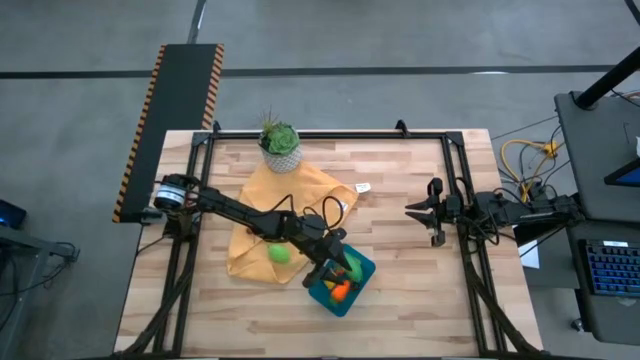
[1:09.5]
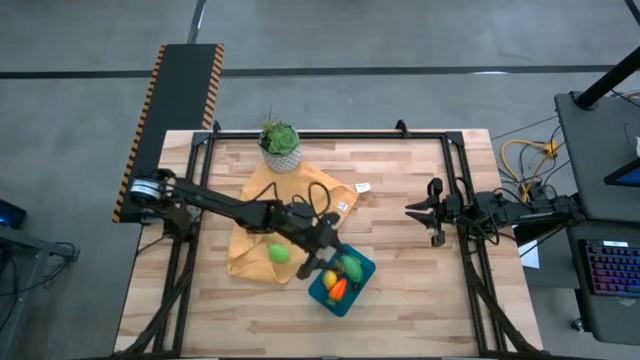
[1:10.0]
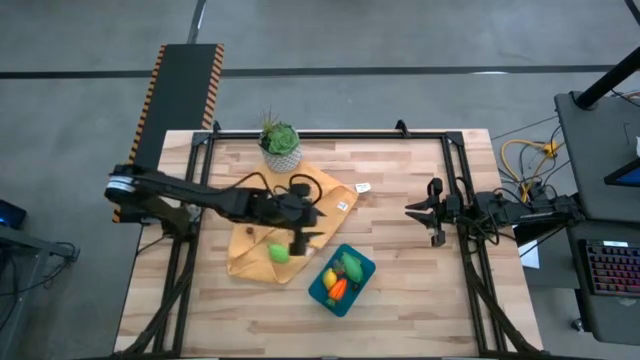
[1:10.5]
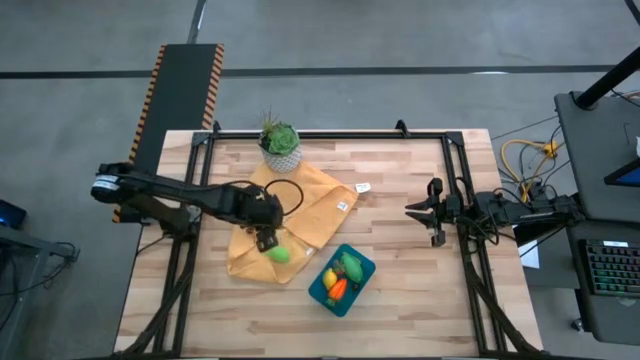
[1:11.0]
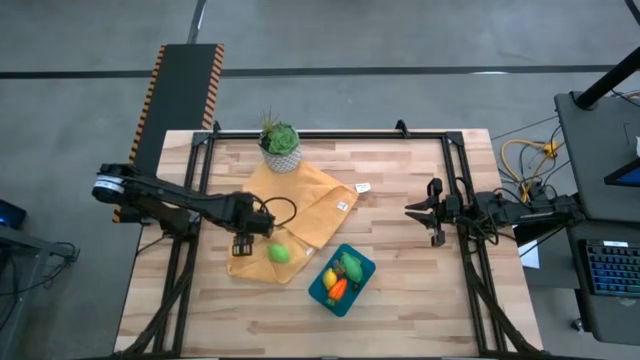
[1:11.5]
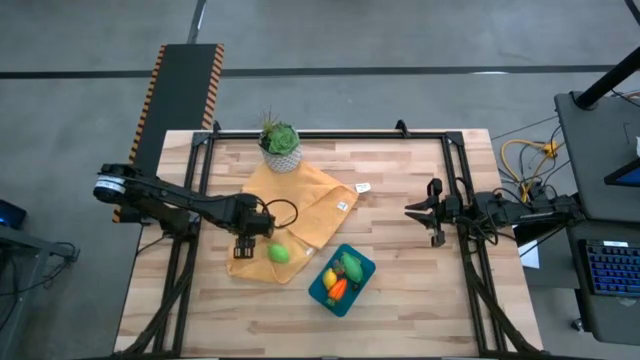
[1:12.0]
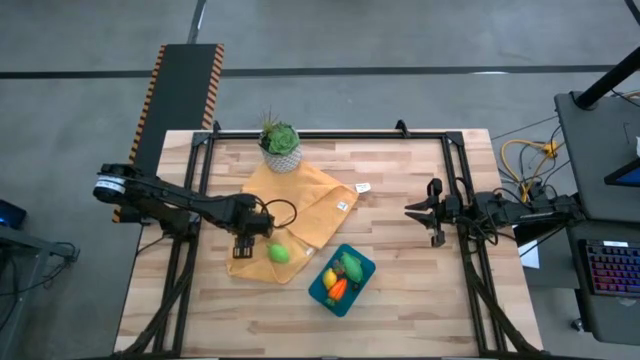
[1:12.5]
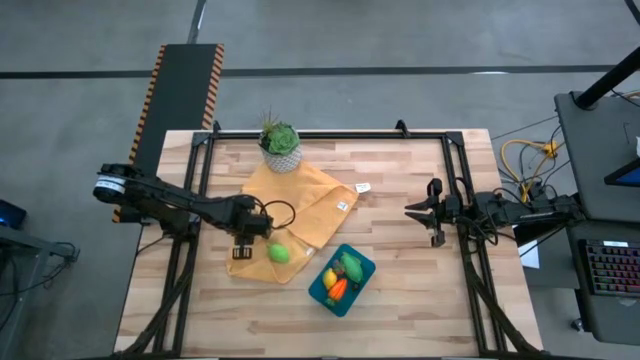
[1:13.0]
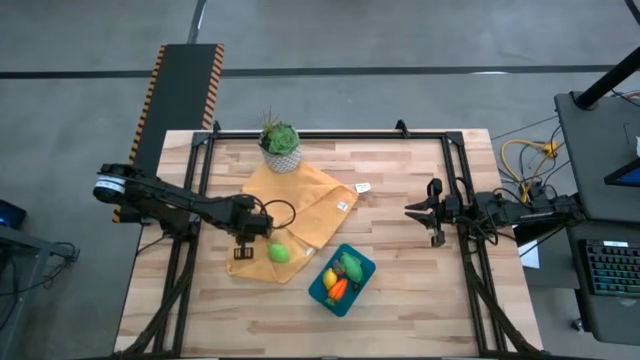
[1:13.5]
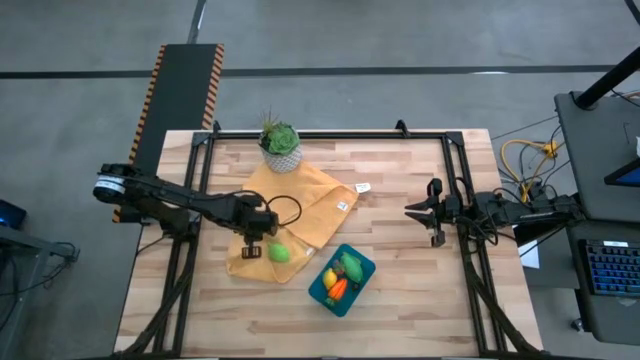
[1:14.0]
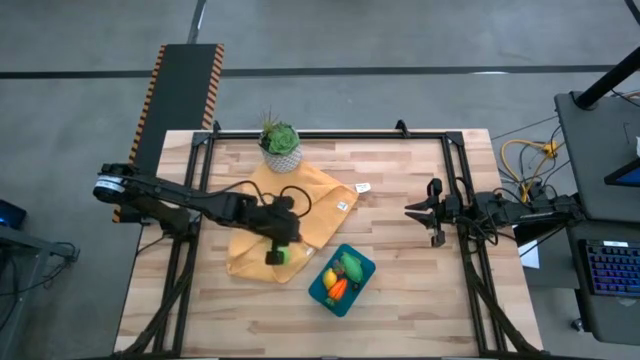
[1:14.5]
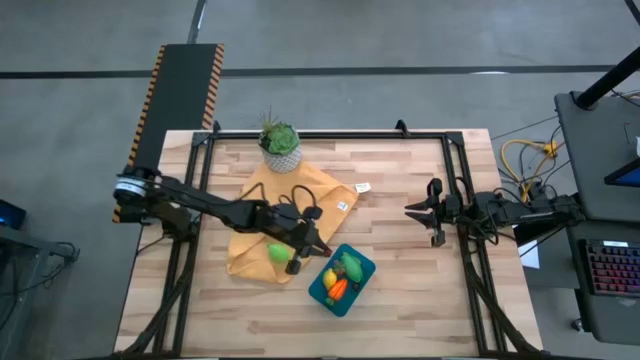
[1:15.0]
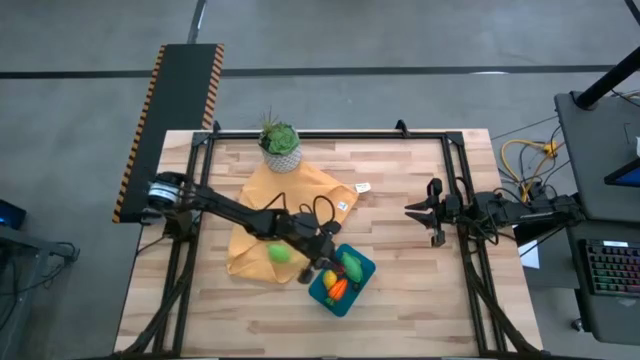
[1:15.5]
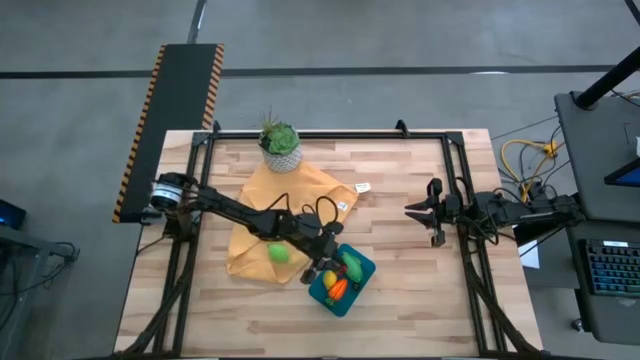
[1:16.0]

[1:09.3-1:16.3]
Task: Pick and placing Produce into tupperware
Put the red cherry into the blue bin

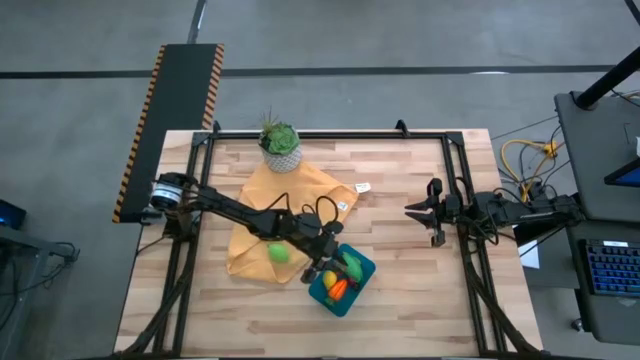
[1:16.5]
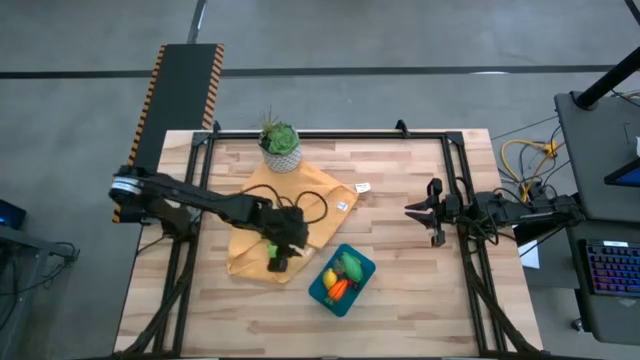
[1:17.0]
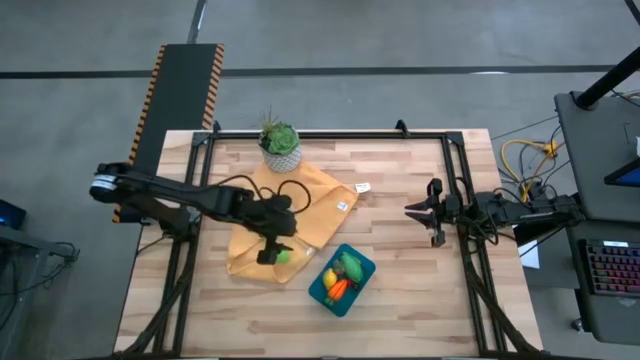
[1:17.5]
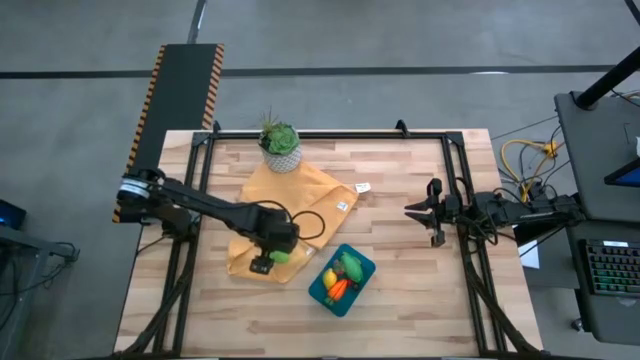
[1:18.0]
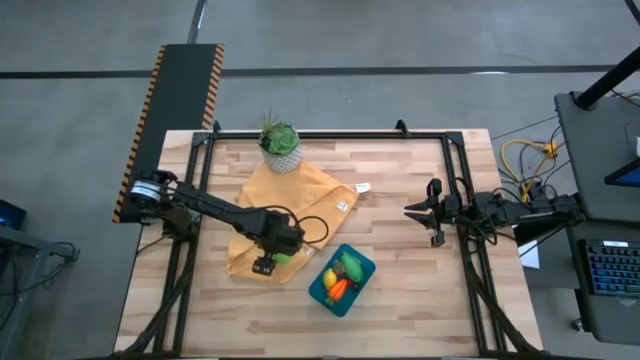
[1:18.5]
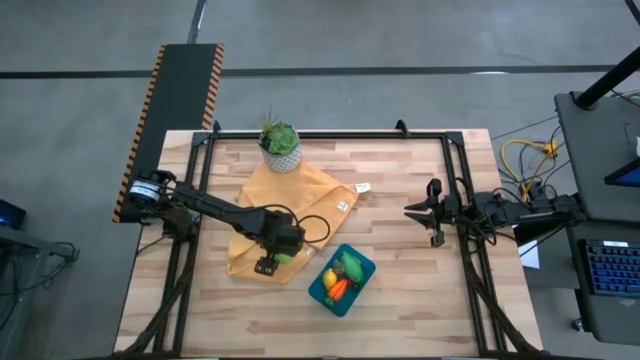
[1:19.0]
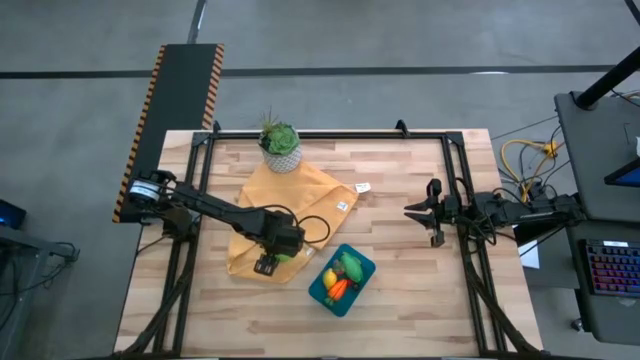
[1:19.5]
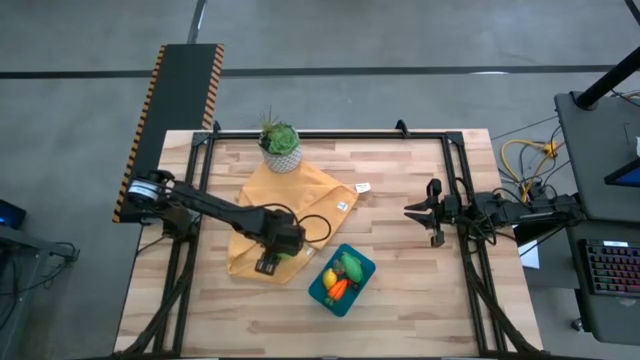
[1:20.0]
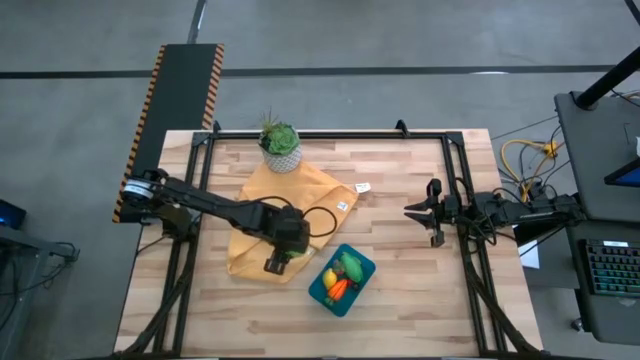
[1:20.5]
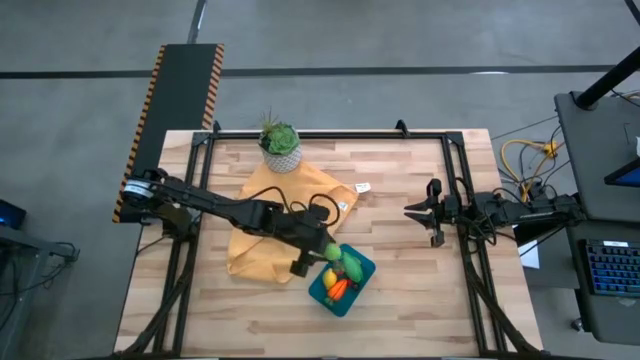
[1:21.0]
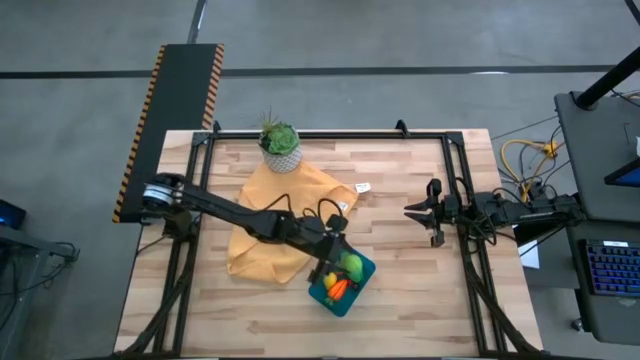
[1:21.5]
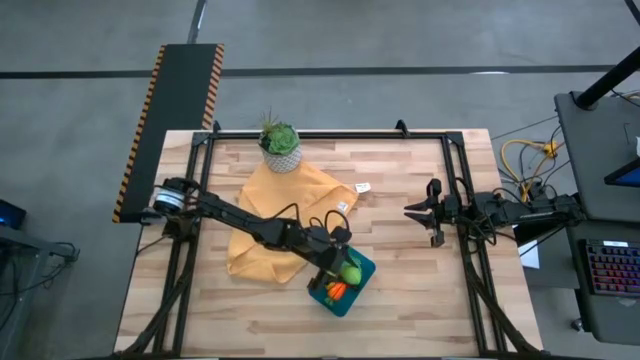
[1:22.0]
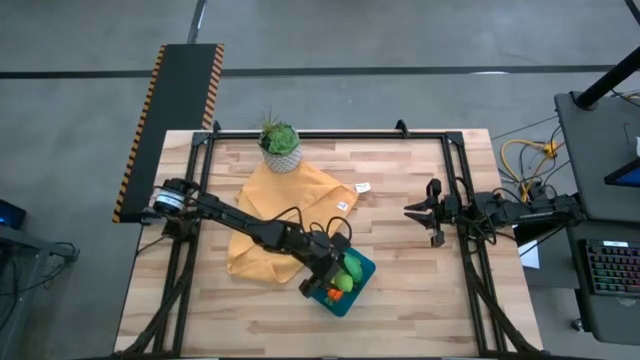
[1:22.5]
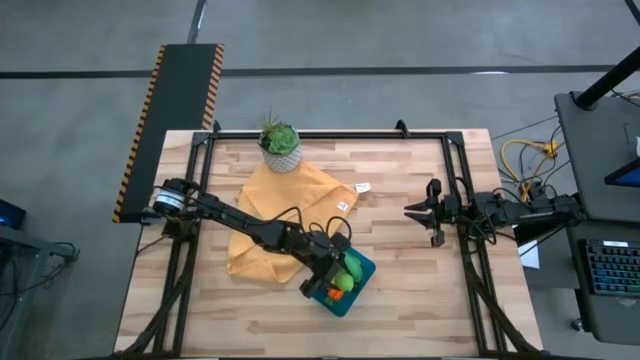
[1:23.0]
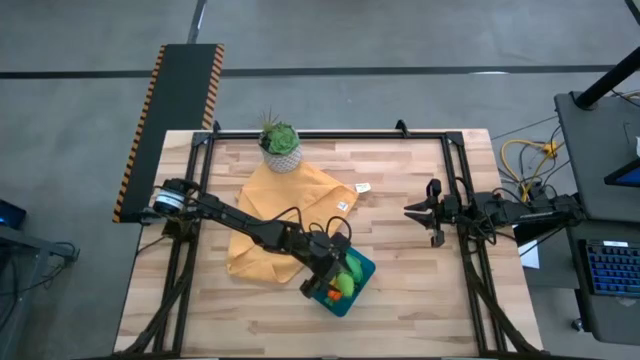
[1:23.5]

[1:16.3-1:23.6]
Put the green melon into the blue bin

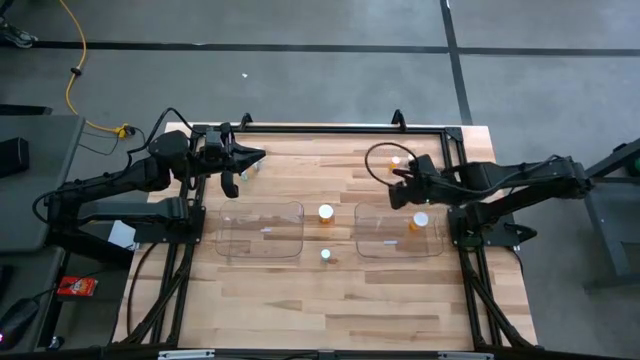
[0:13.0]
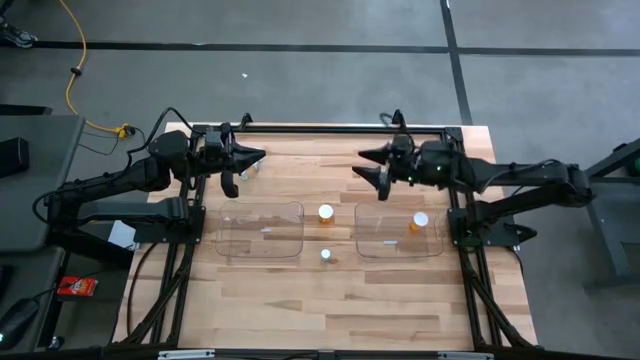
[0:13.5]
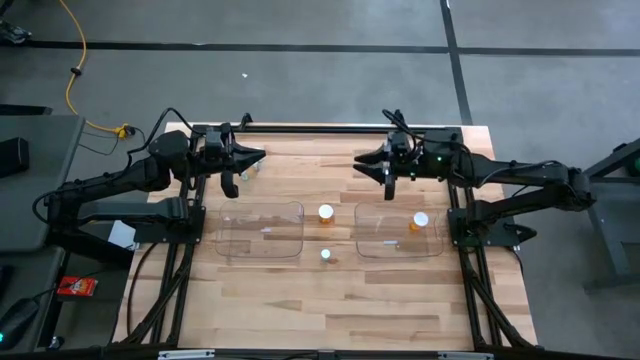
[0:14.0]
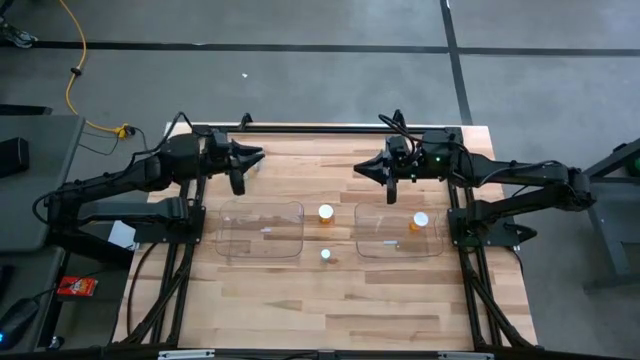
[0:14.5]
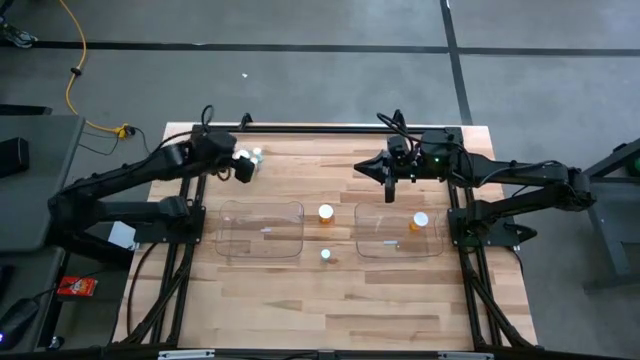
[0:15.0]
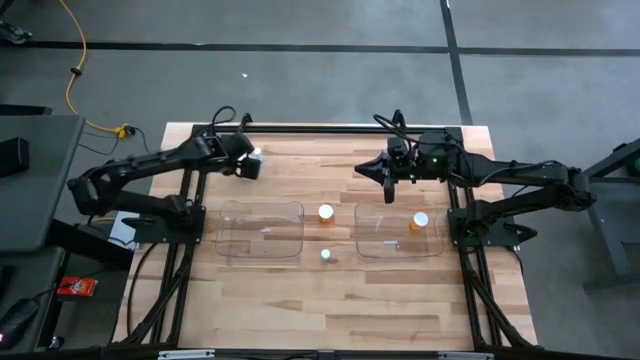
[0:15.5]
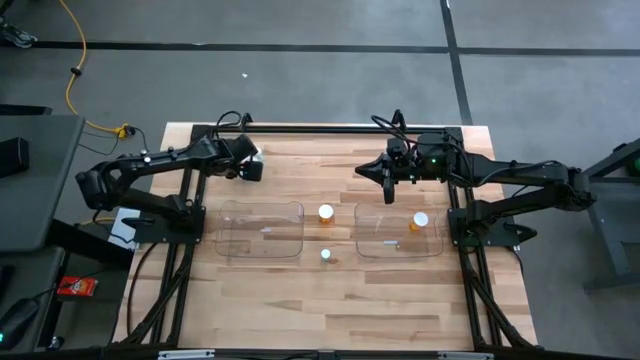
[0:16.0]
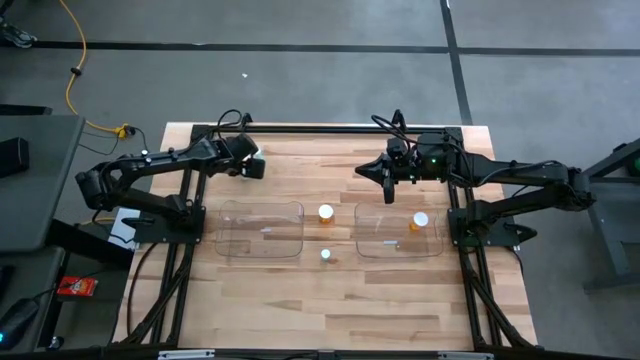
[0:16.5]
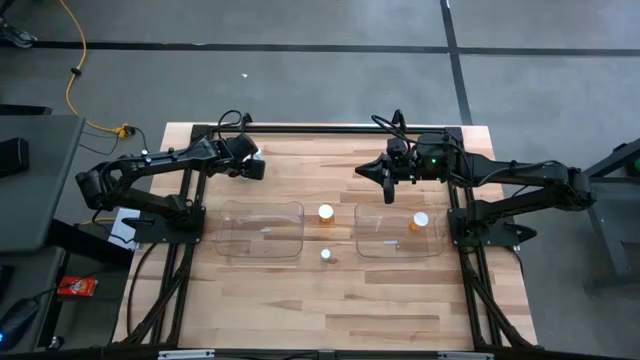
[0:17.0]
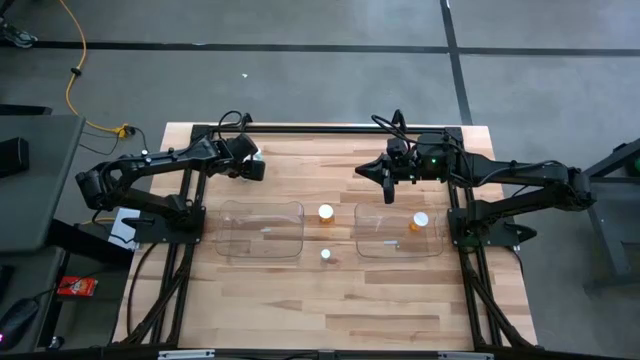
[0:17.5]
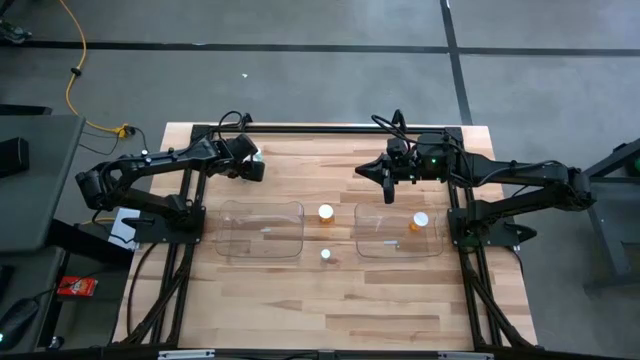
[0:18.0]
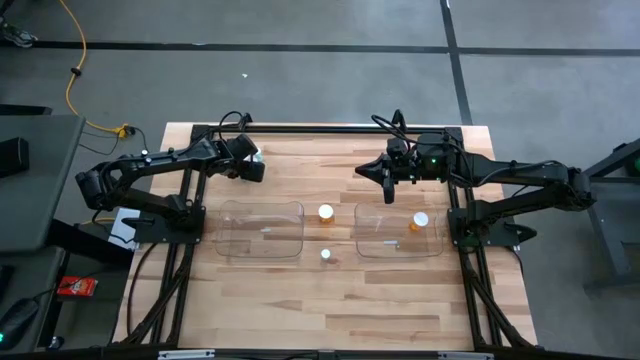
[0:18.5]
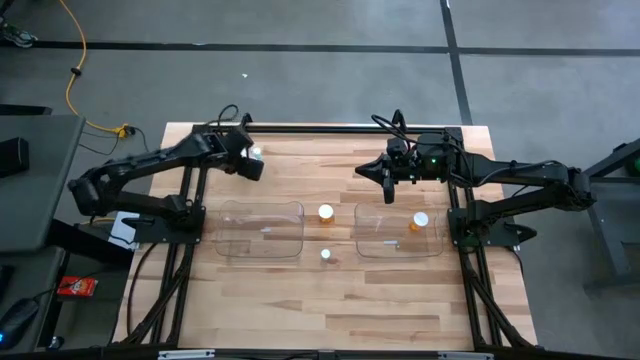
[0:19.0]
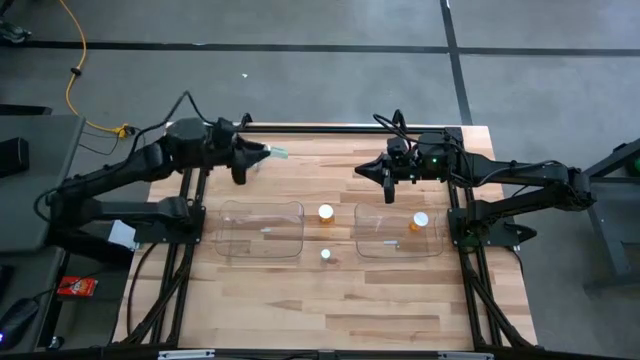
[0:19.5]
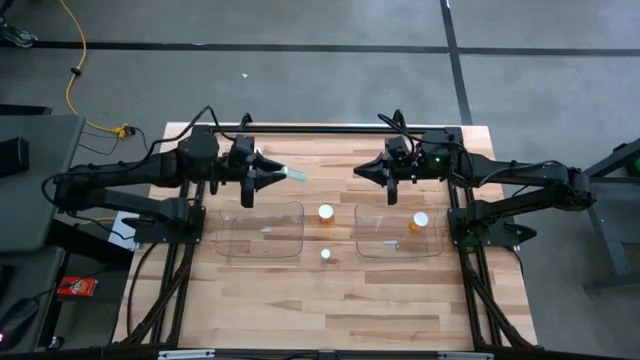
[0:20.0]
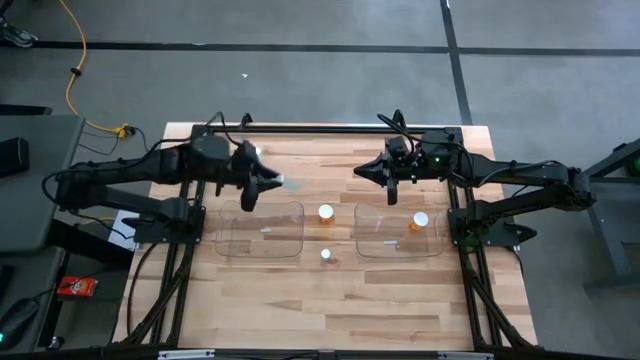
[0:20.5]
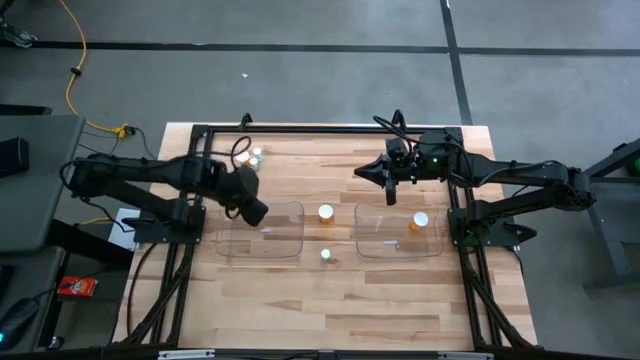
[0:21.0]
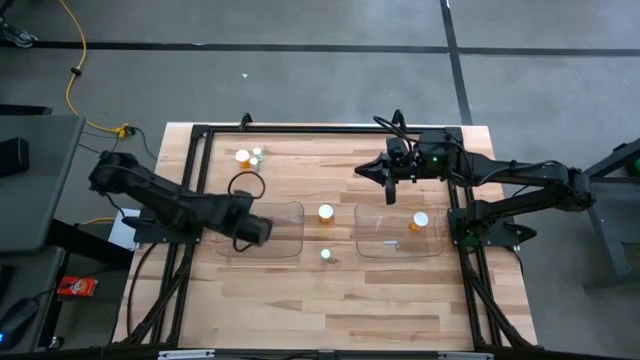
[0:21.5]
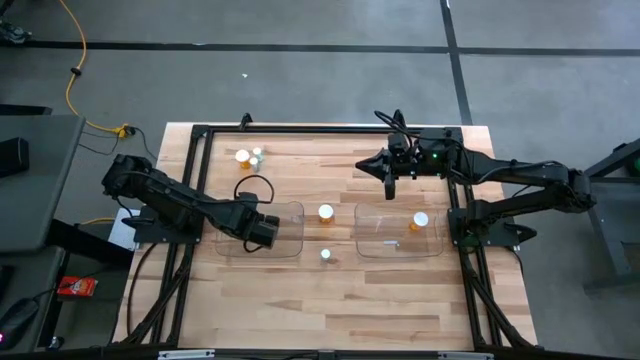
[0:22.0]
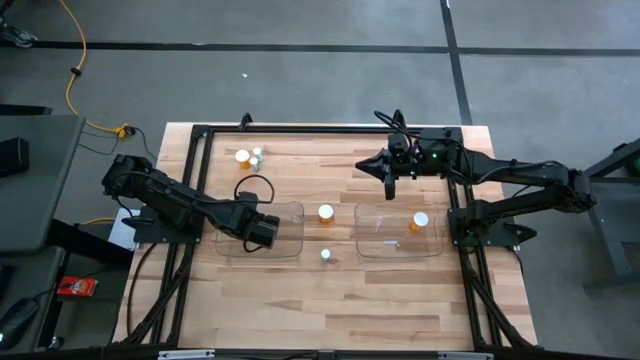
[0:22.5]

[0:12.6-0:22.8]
Task: Pick and place medicine bottles into bin by pill shape (circle, oval)
Put the middle blue tablet bottle into the left transparent bin
